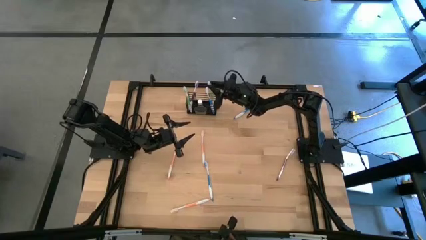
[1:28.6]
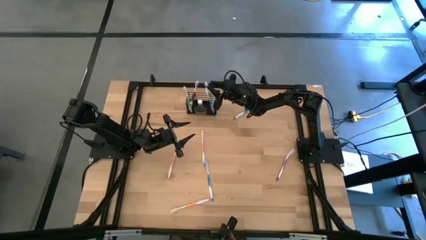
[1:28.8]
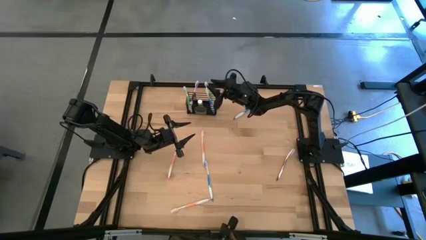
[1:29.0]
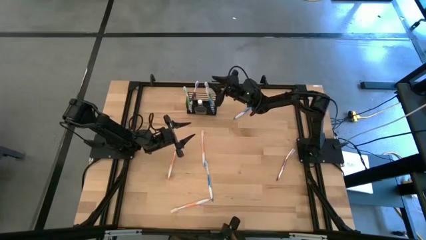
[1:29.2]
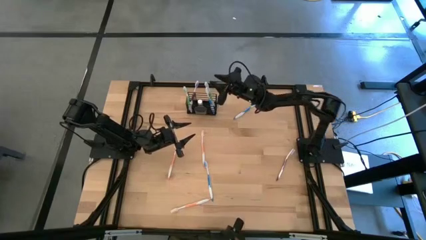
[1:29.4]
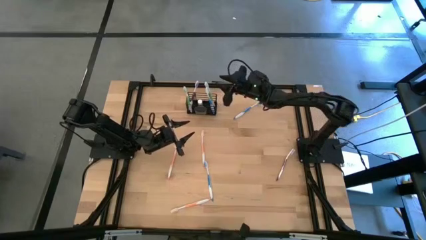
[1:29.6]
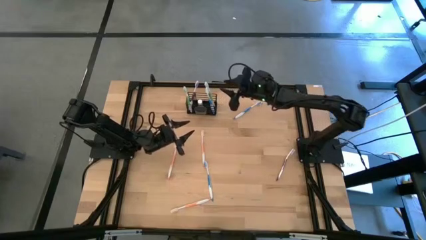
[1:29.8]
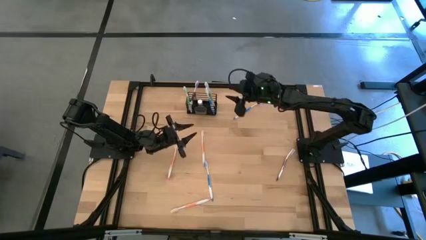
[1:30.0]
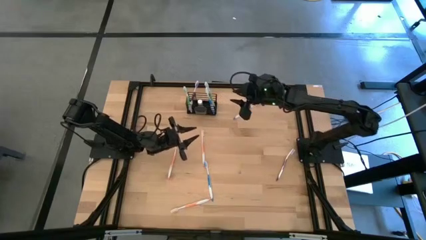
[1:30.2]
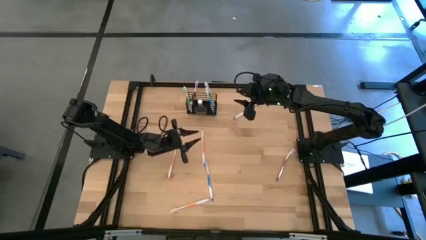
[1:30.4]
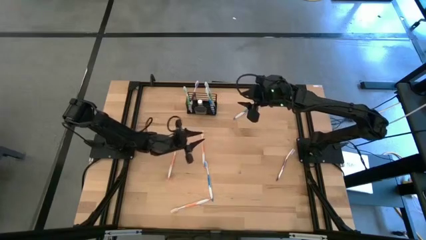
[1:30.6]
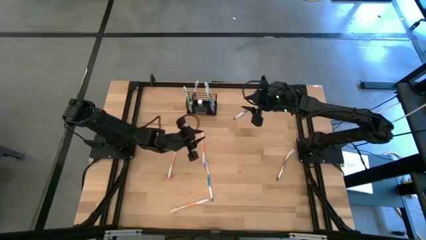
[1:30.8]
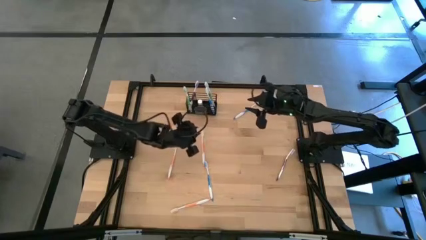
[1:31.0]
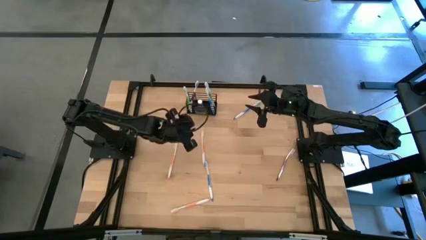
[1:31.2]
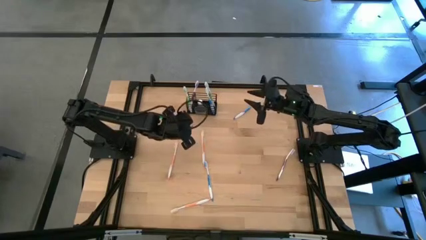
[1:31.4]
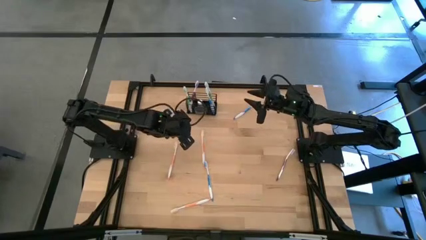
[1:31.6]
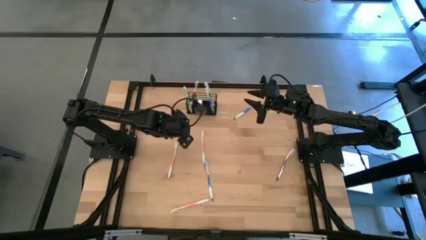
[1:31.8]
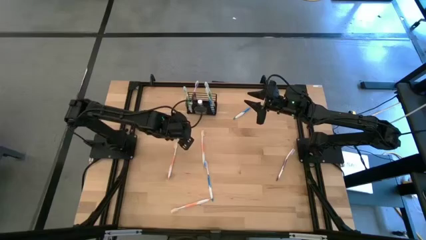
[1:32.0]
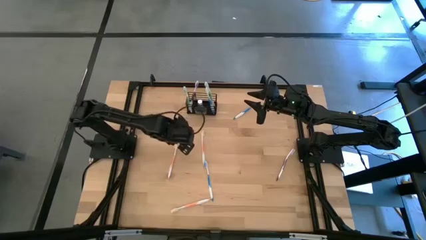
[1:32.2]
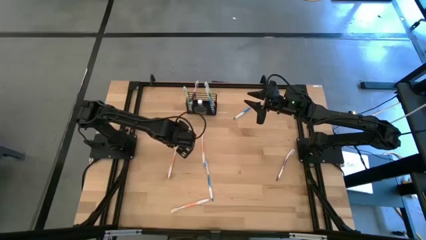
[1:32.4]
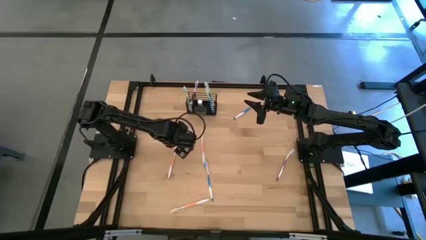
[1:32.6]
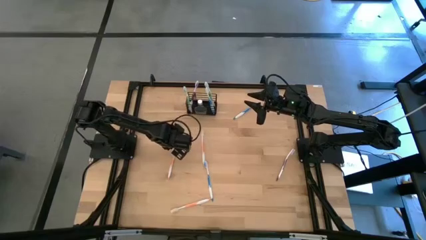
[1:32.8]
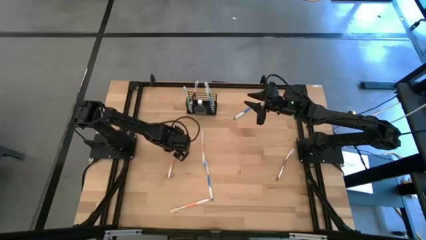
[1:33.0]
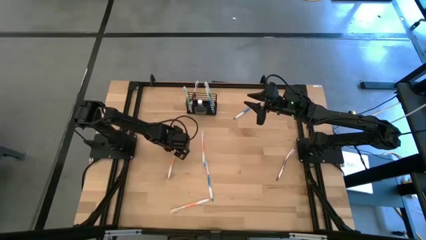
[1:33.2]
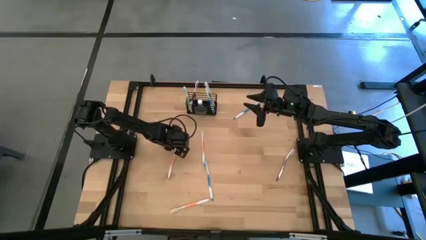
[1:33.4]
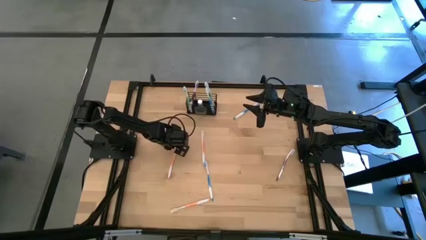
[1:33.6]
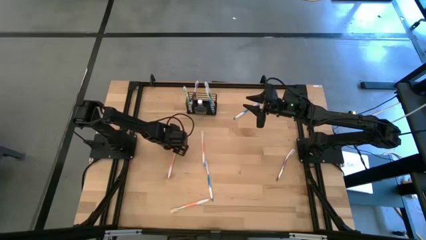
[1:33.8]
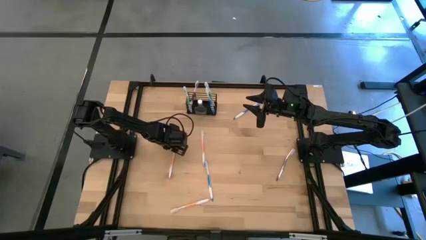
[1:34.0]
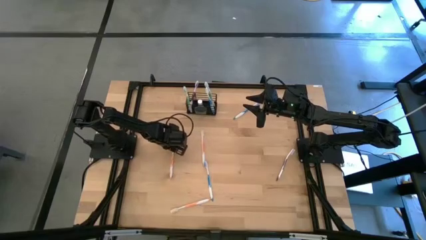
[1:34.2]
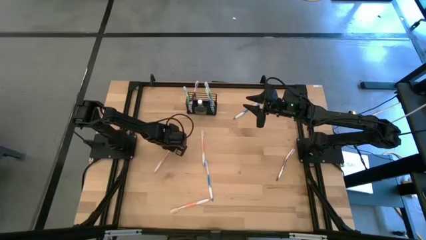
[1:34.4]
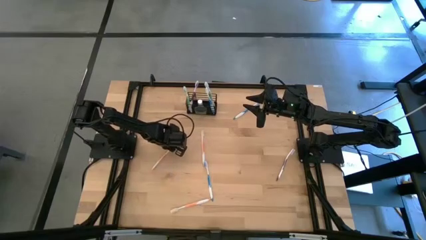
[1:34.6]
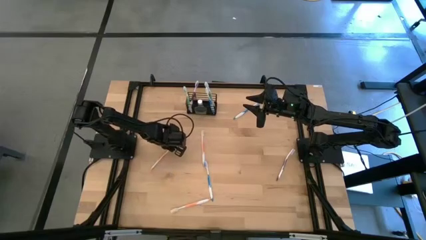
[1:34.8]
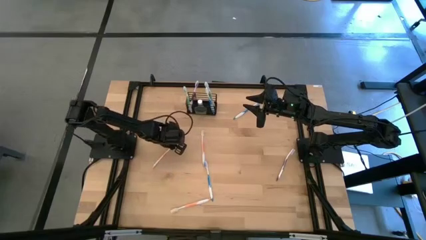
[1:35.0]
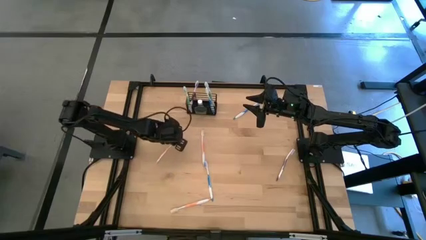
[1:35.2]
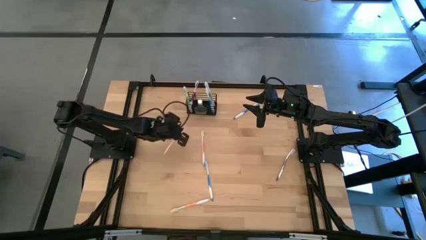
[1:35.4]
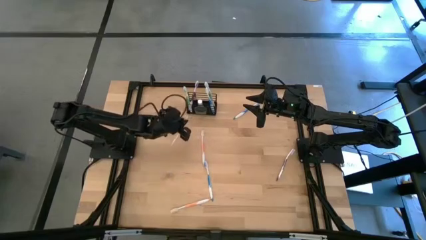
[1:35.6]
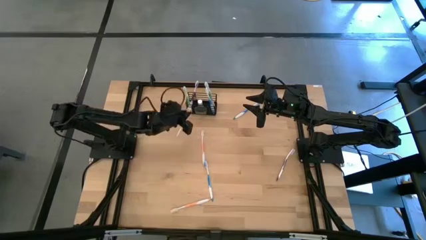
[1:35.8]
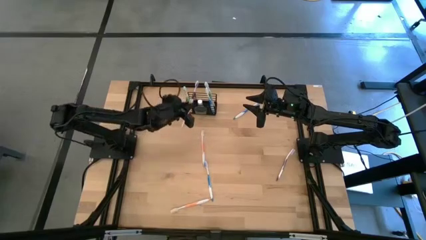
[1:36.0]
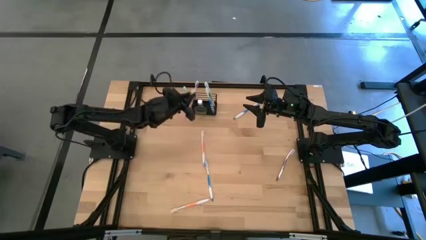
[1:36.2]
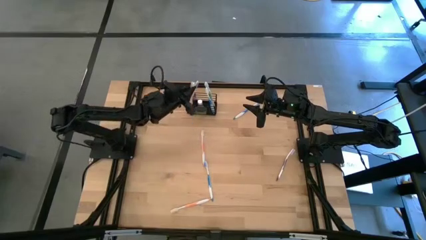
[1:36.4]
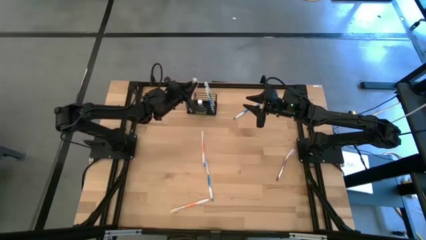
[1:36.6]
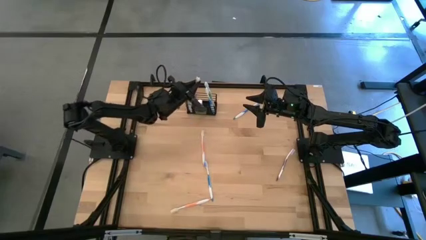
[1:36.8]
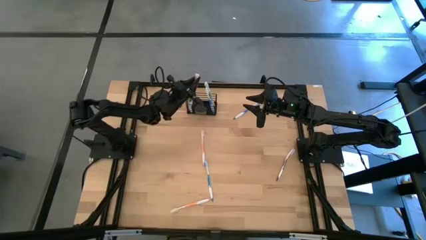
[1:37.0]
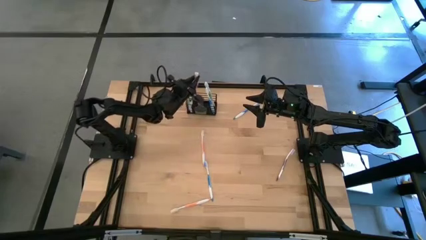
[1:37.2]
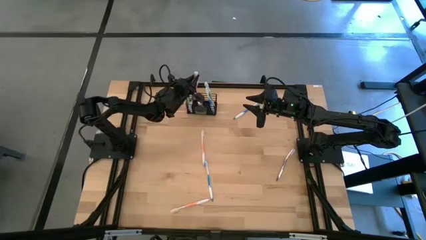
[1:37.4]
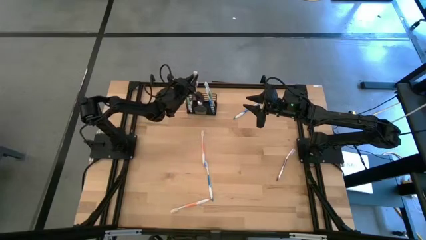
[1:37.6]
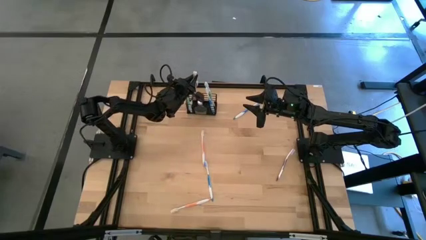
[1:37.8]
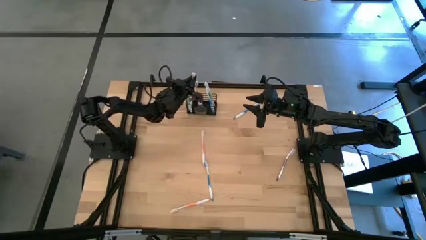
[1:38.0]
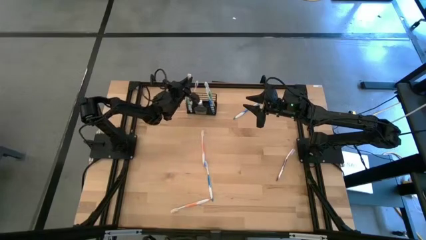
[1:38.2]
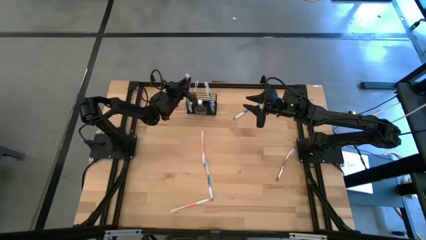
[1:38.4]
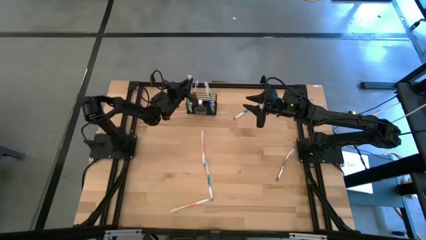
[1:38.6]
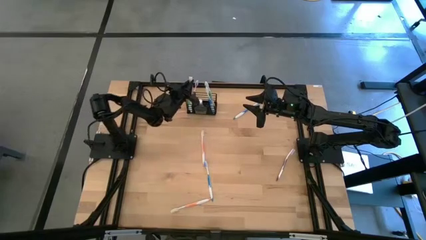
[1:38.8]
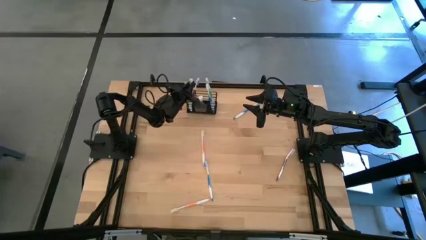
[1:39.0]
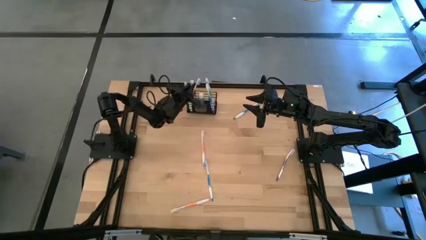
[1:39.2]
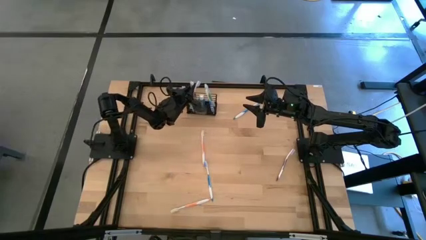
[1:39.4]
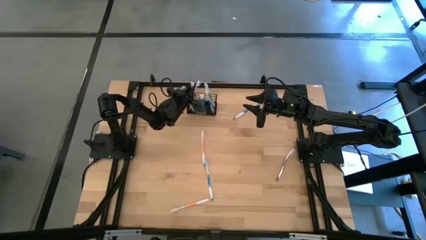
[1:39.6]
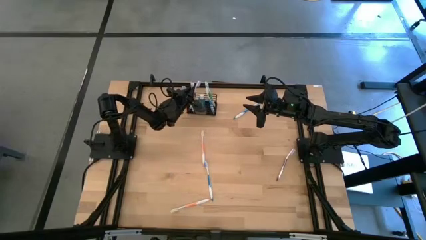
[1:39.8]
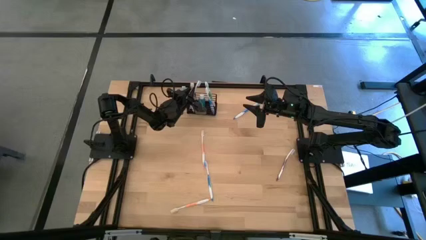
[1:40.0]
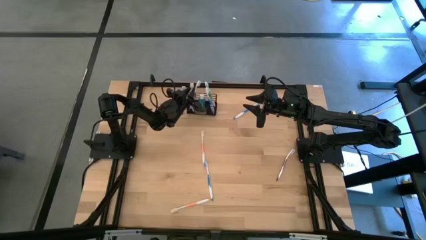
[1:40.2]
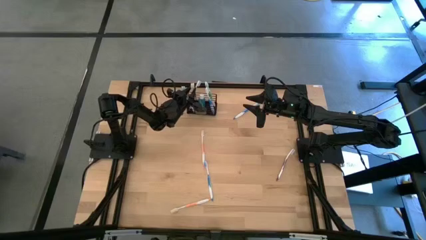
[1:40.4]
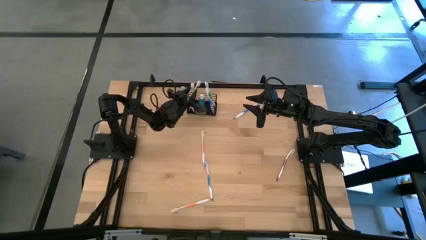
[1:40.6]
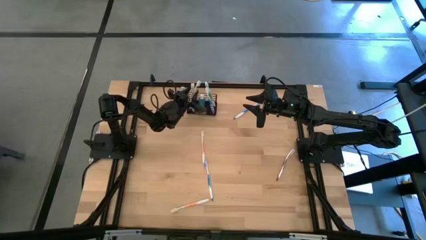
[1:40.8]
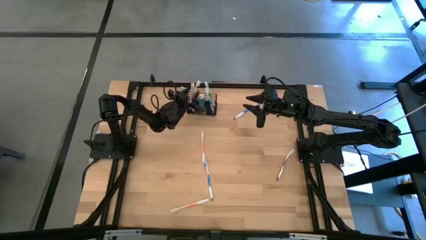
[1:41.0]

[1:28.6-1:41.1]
Task: Pick & Place toothbrushing station
Put the top left orange toothbrush into the black wire organizer
